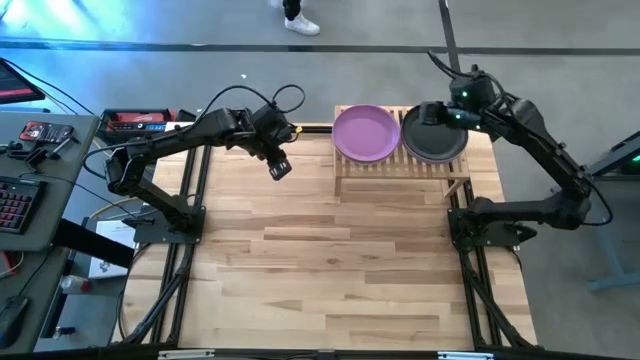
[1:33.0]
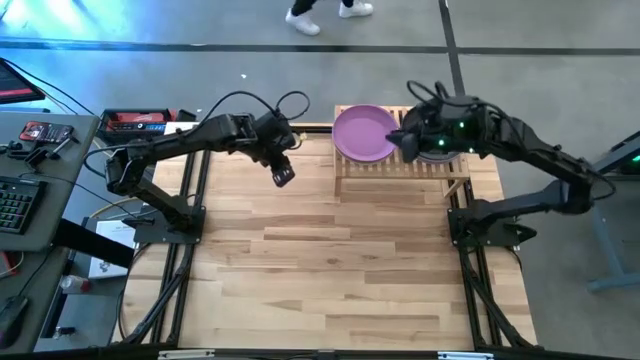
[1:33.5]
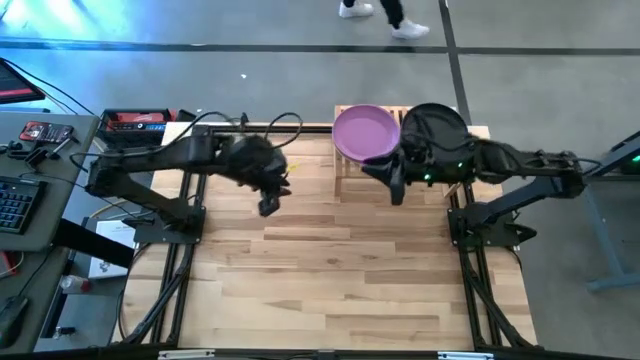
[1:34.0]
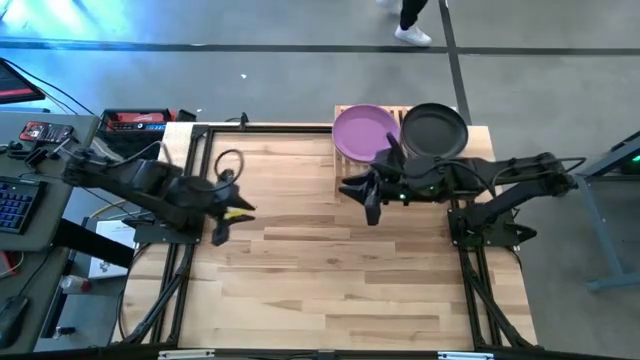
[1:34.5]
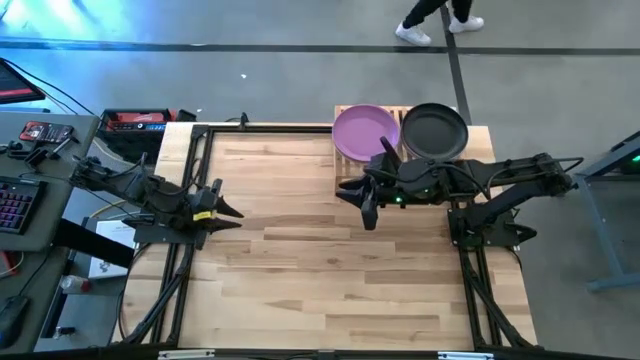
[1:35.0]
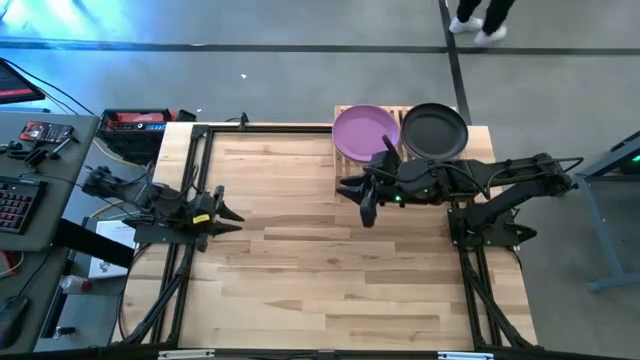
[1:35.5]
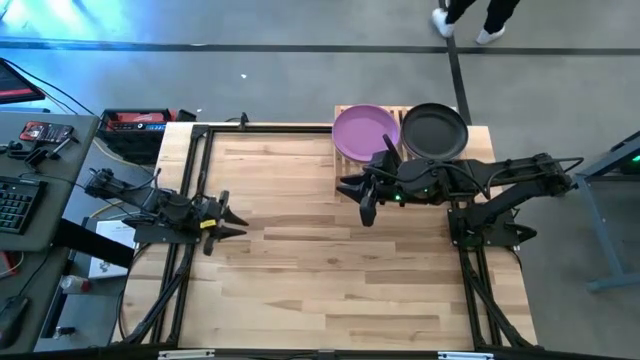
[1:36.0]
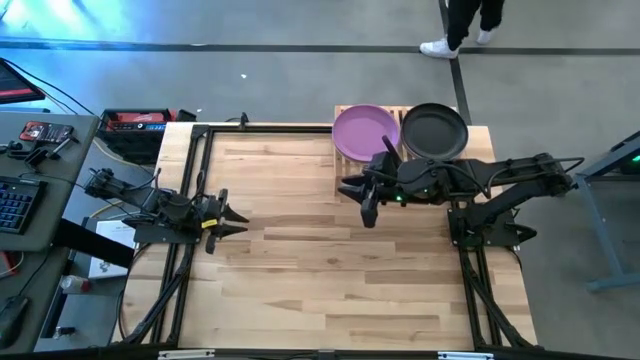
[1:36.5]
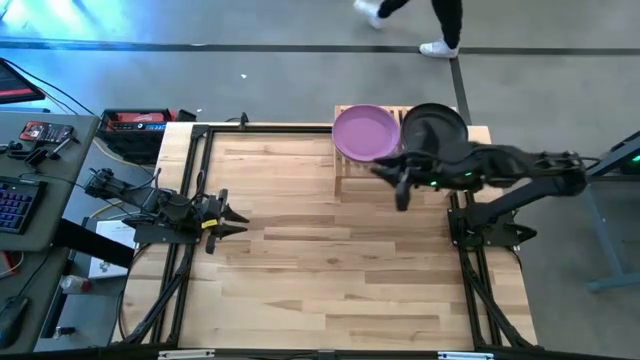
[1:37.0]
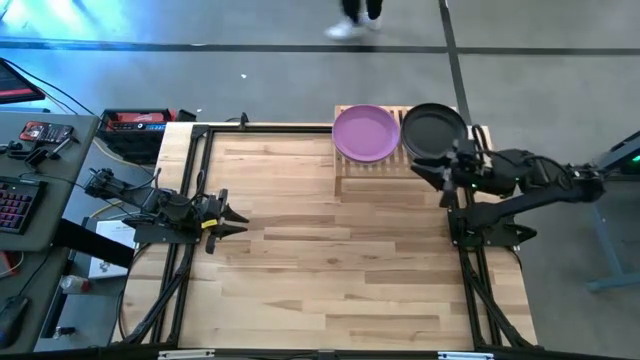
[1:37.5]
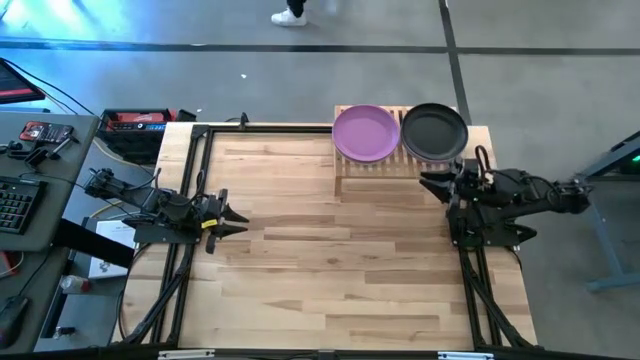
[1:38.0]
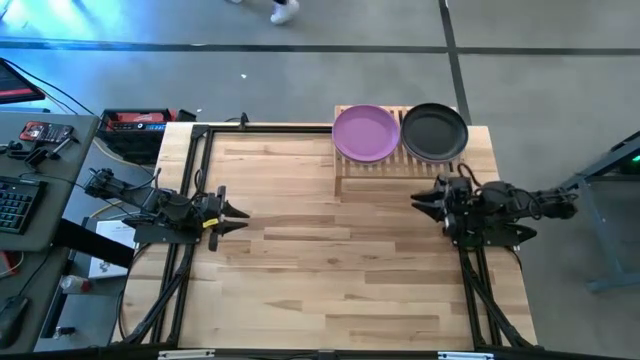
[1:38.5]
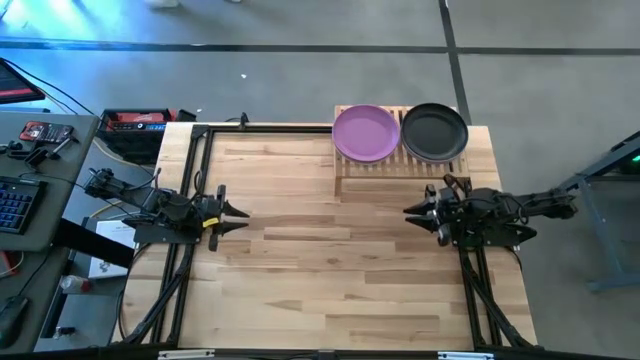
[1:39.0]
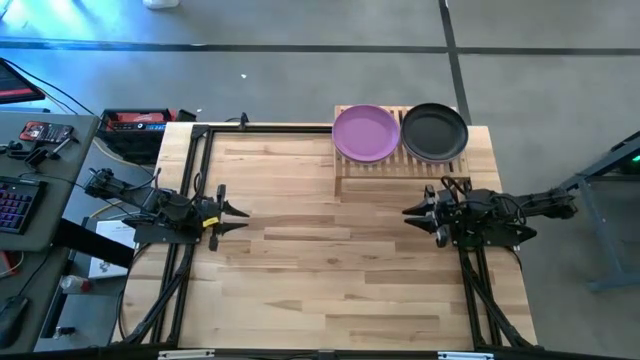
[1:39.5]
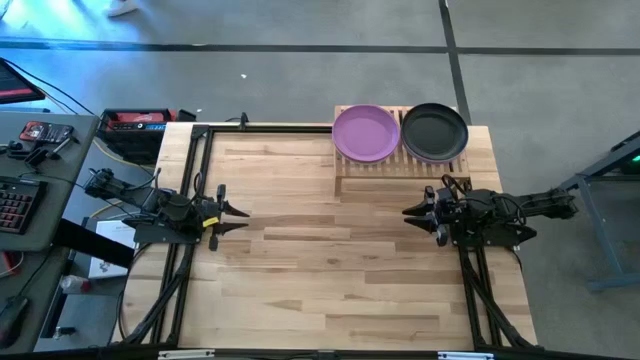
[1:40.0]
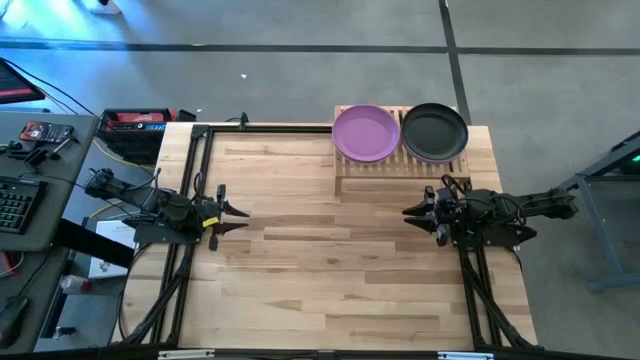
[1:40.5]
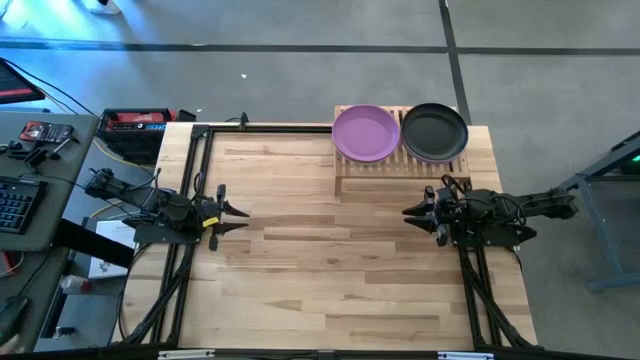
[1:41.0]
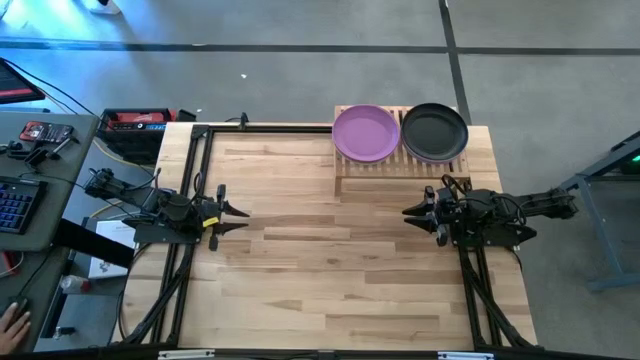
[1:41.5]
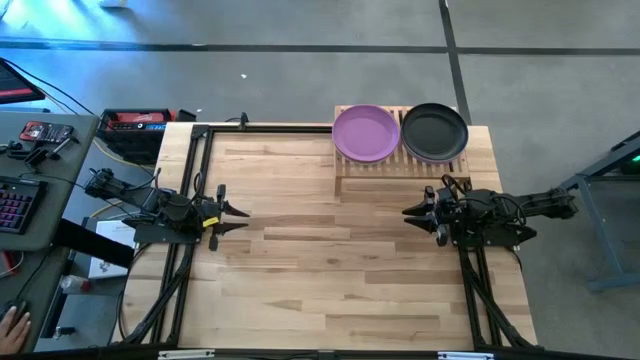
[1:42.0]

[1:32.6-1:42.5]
Task: Place and stack plates onto a shelf
Return to Home Position

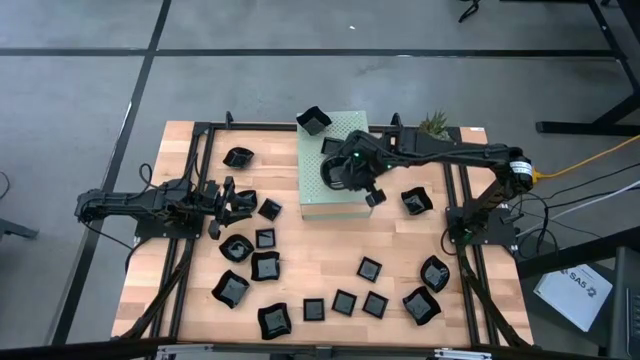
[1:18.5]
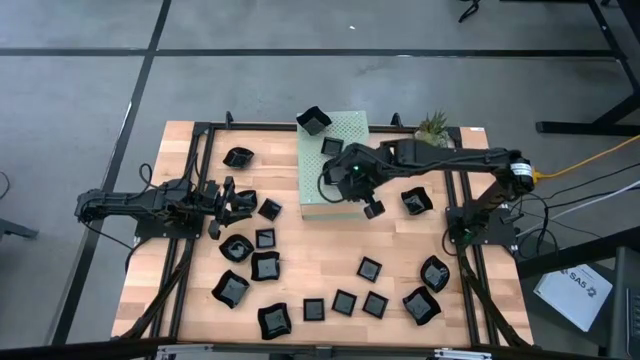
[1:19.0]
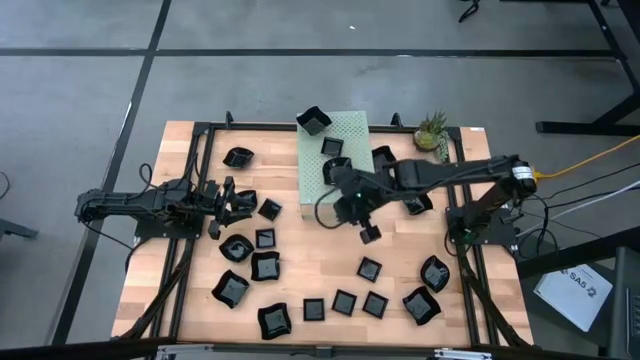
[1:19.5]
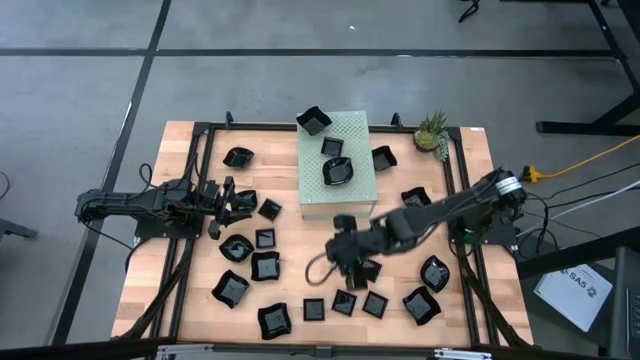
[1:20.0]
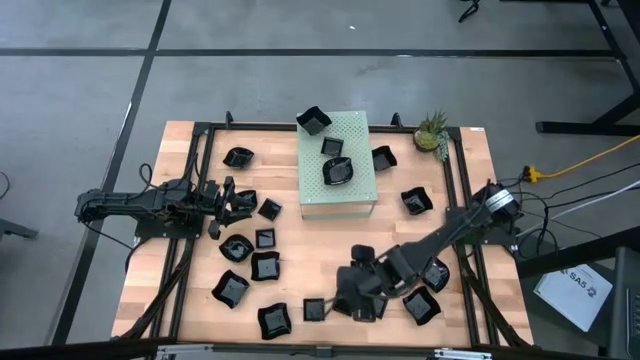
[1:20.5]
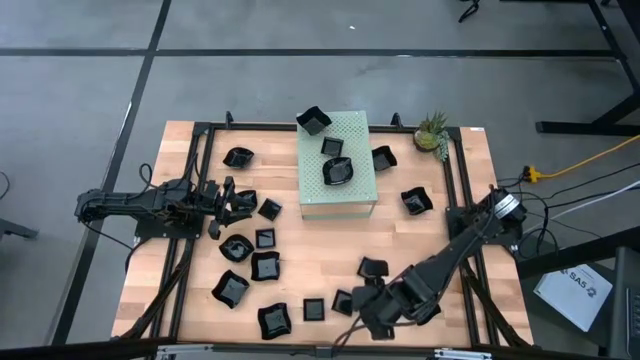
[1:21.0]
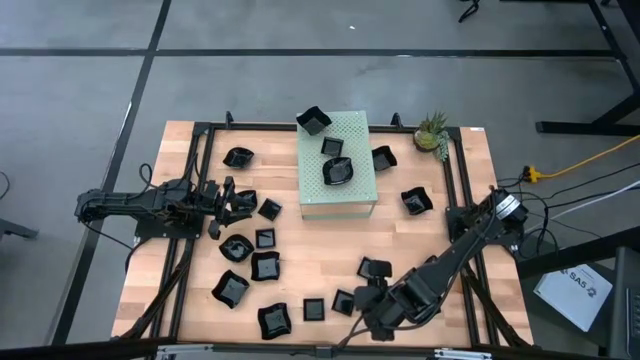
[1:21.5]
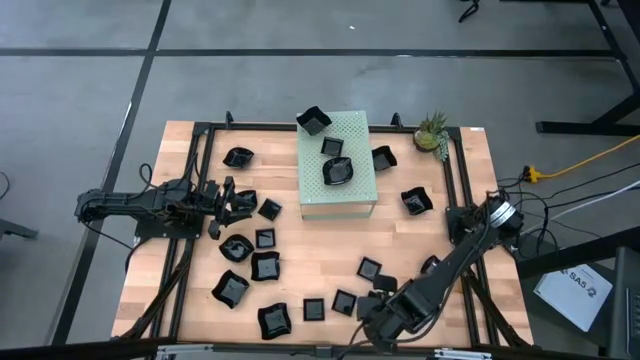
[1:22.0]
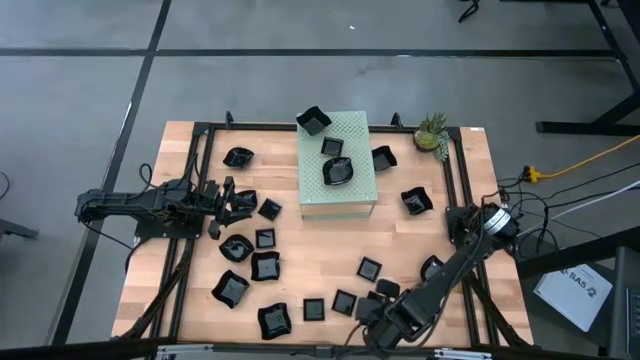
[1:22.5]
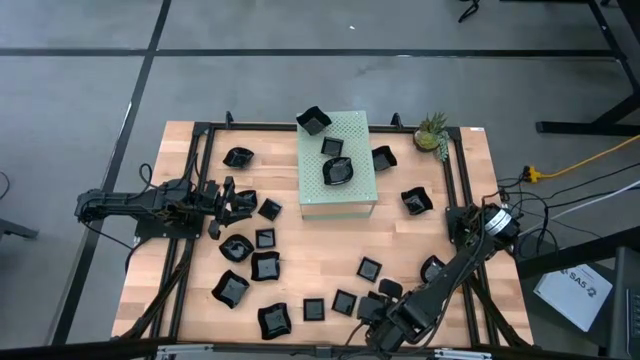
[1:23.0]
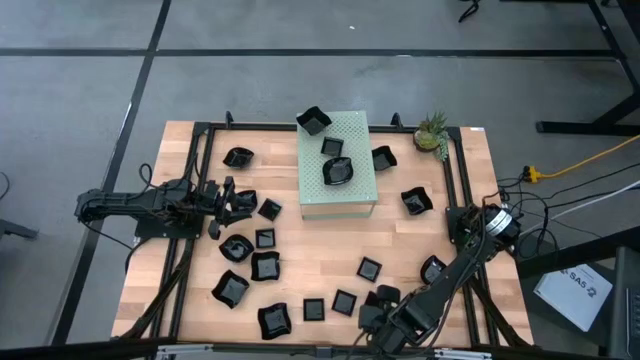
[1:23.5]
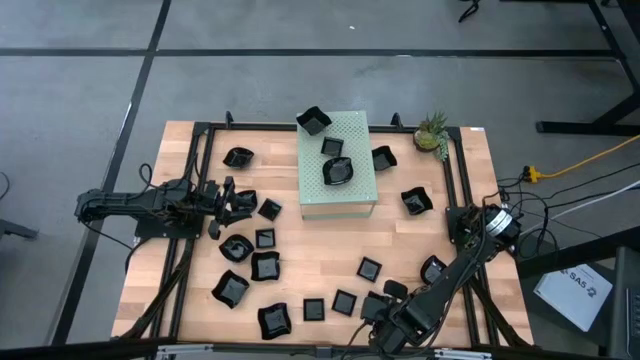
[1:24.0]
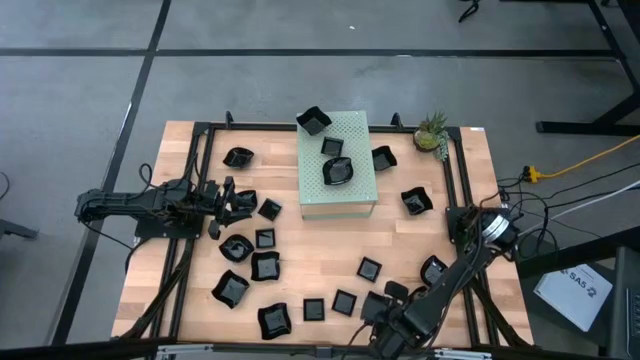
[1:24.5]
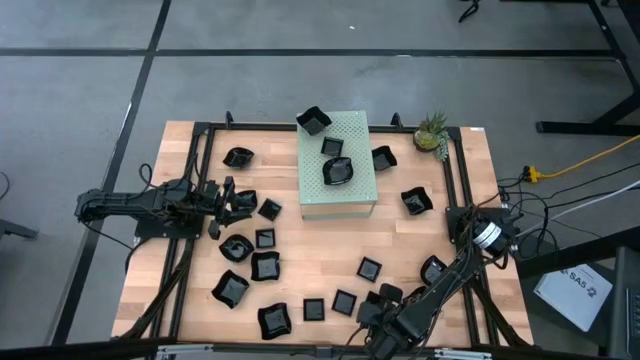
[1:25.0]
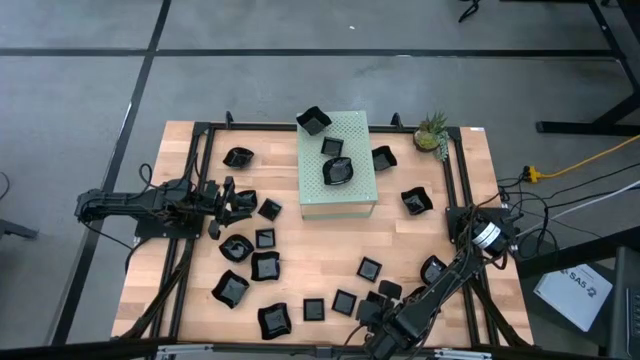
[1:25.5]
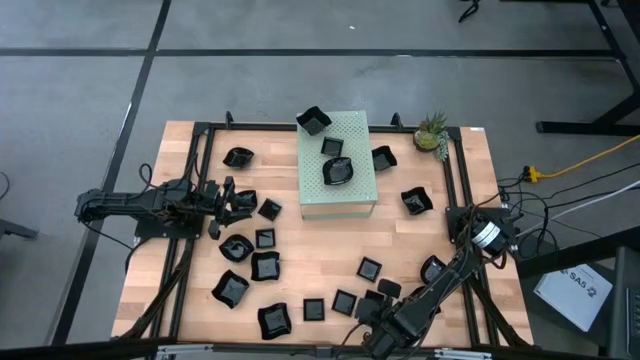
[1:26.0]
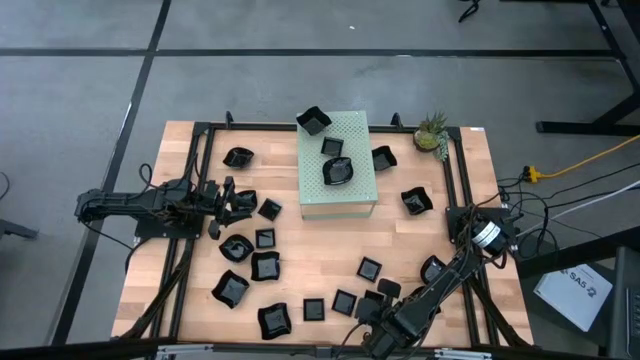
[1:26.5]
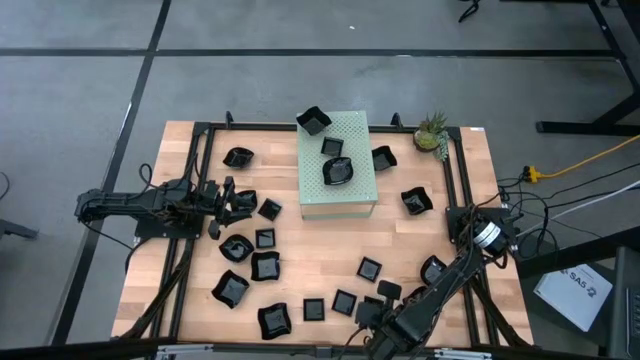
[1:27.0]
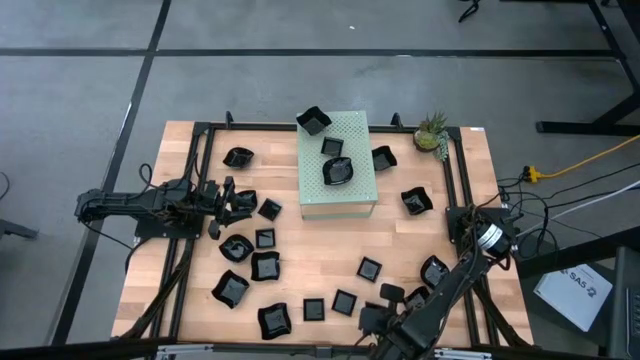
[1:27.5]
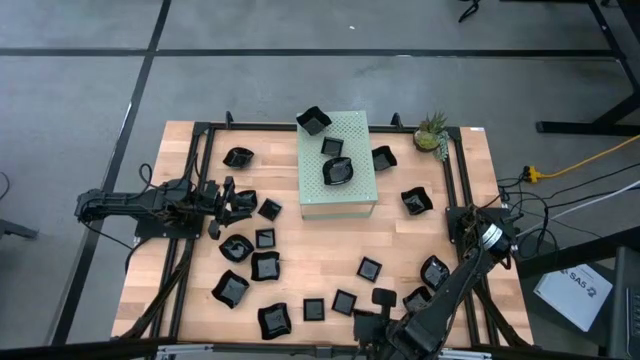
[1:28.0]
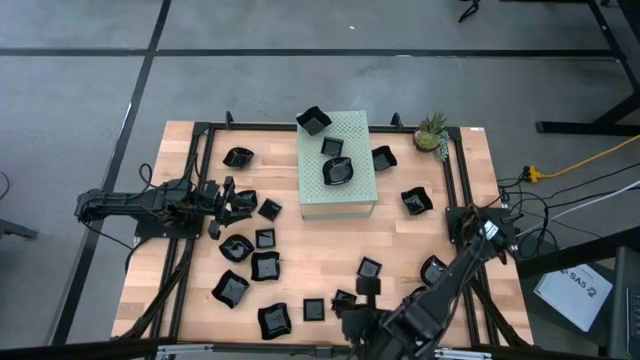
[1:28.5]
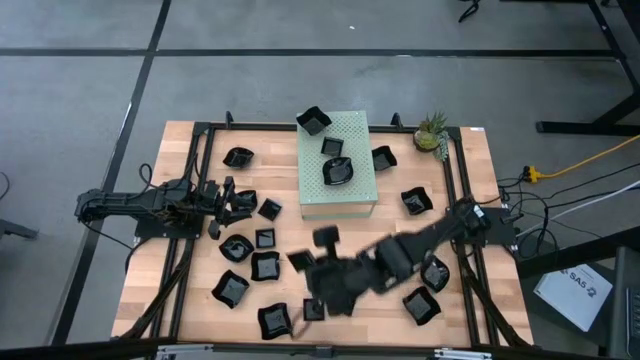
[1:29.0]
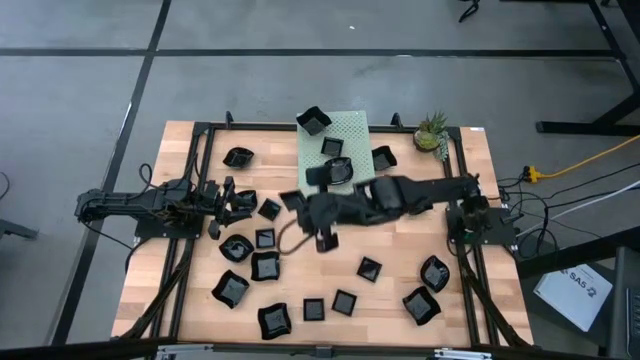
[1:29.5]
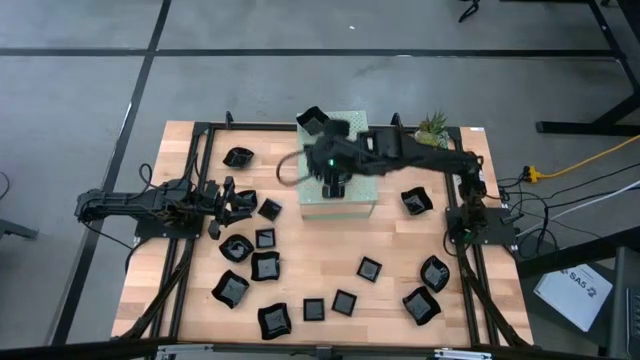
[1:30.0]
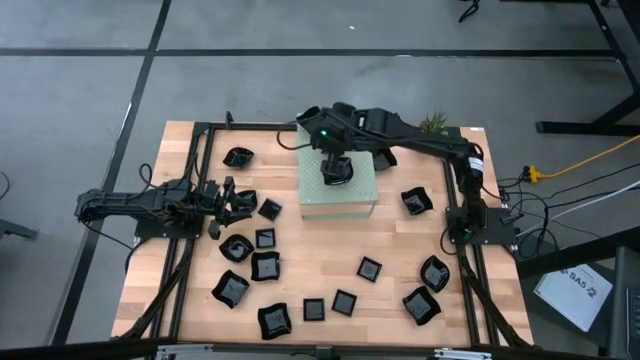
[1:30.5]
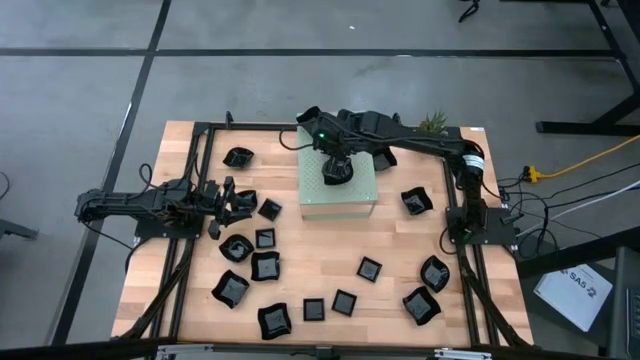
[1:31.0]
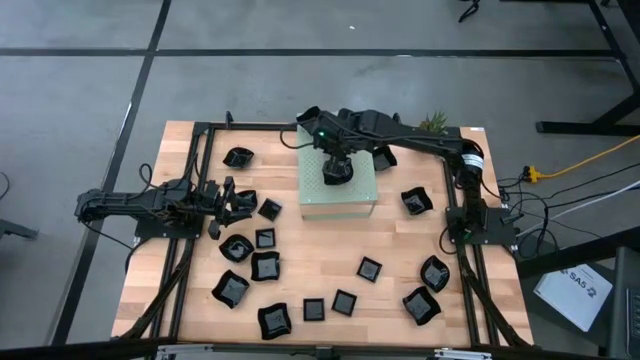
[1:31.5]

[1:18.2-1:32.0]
Task: Pick & Place Mini shaped plates
Stack the black square plate on top of the black square plate on the shelf
